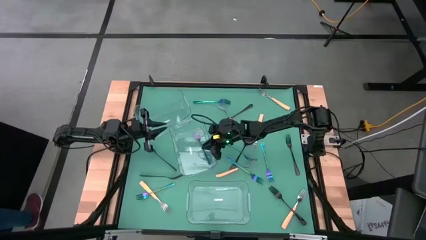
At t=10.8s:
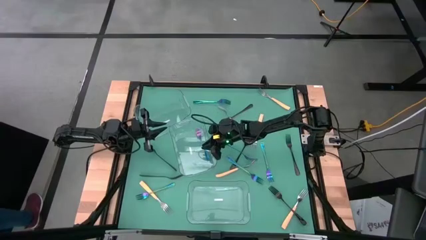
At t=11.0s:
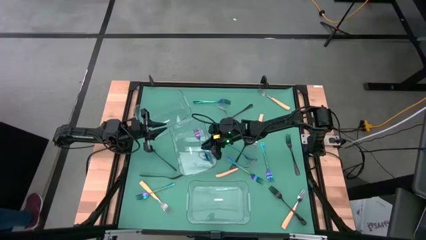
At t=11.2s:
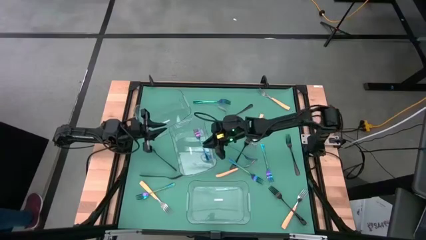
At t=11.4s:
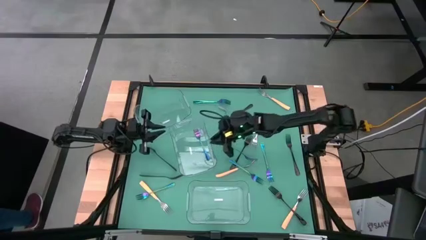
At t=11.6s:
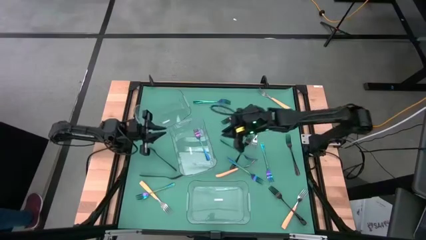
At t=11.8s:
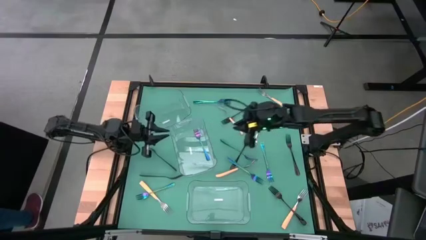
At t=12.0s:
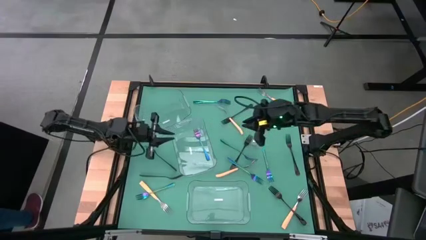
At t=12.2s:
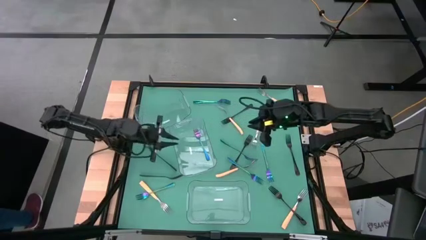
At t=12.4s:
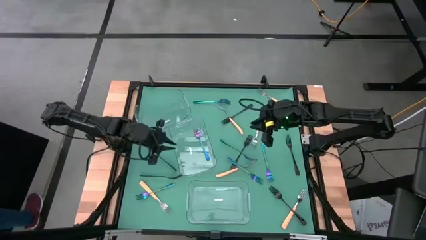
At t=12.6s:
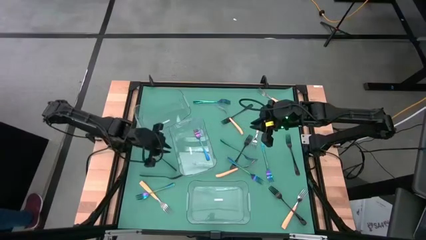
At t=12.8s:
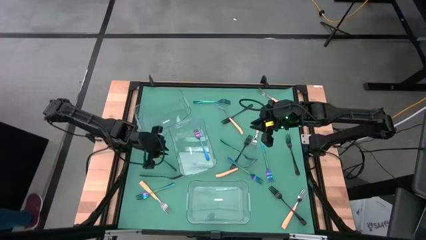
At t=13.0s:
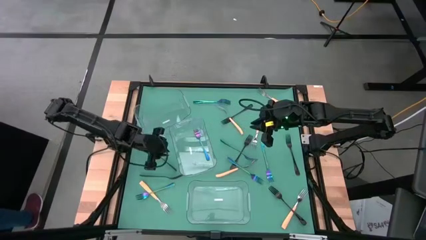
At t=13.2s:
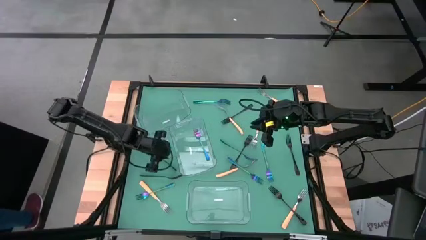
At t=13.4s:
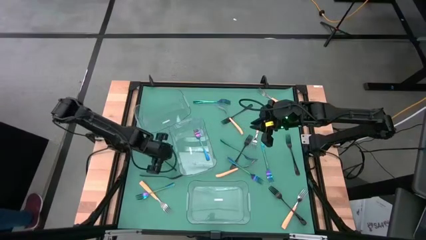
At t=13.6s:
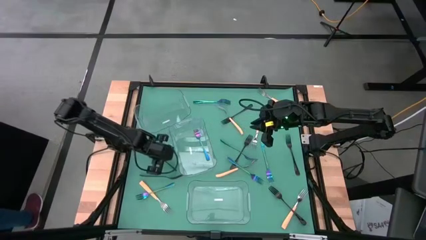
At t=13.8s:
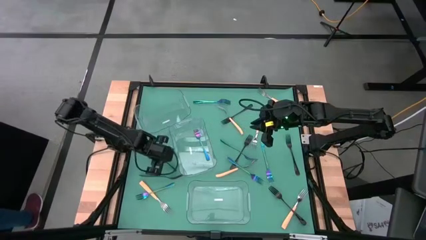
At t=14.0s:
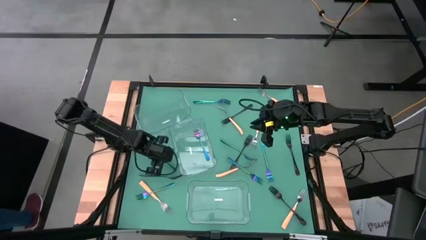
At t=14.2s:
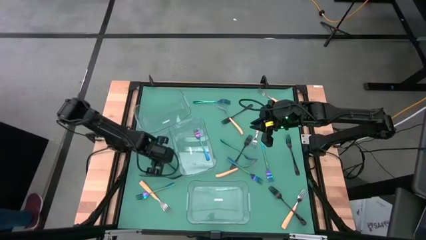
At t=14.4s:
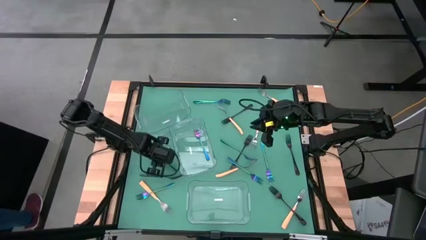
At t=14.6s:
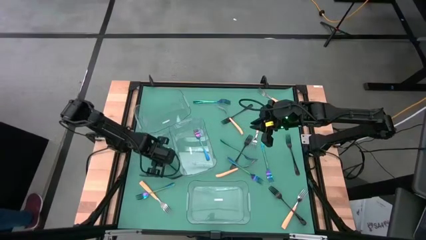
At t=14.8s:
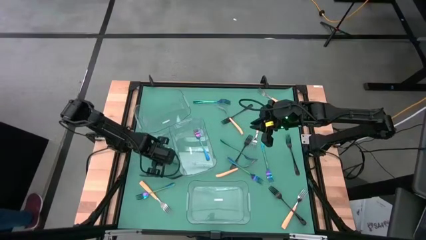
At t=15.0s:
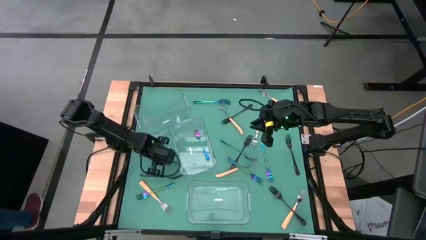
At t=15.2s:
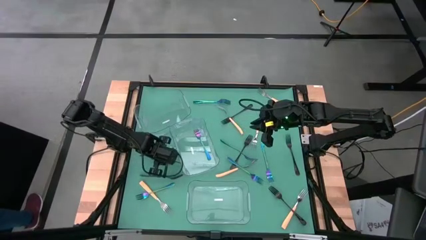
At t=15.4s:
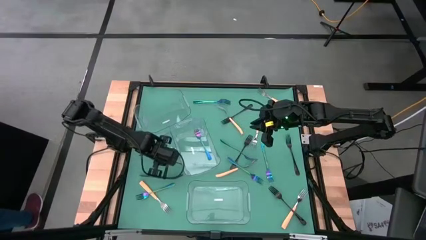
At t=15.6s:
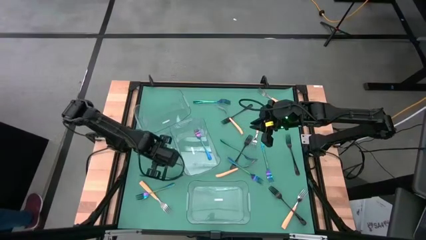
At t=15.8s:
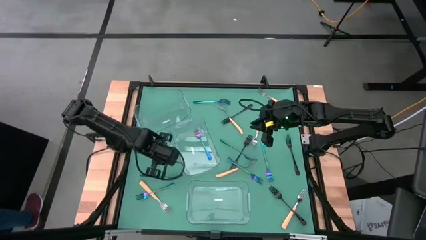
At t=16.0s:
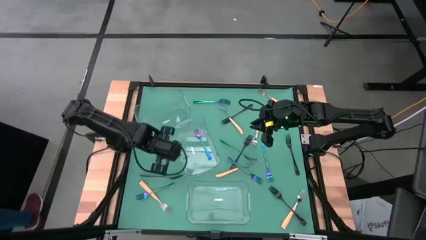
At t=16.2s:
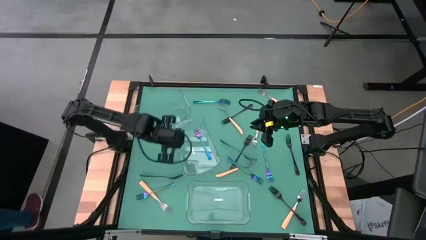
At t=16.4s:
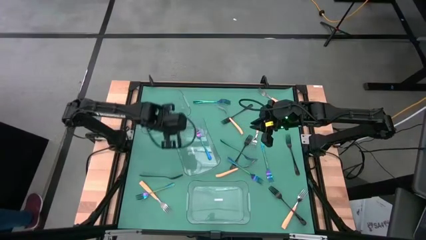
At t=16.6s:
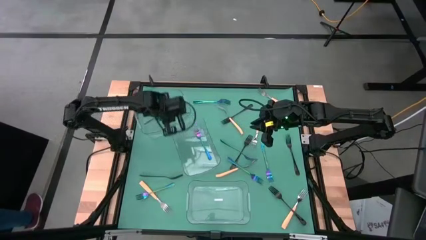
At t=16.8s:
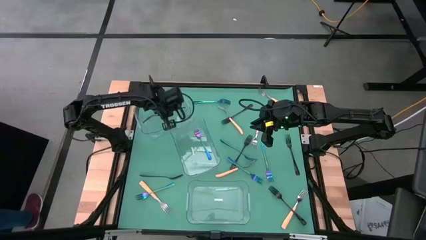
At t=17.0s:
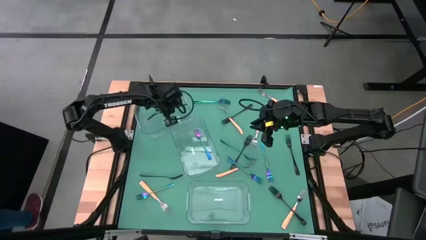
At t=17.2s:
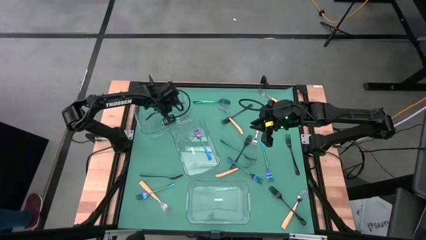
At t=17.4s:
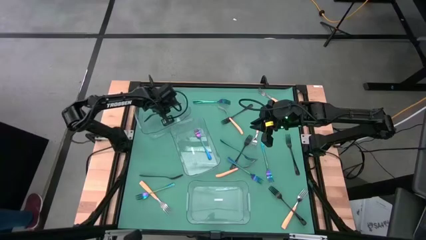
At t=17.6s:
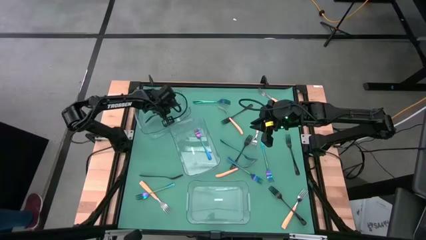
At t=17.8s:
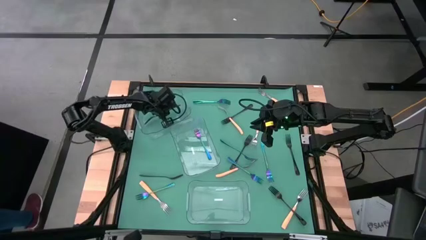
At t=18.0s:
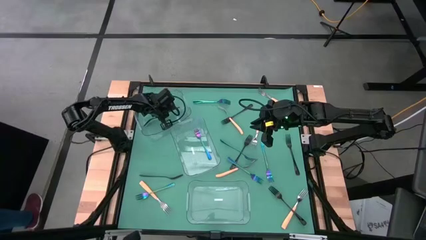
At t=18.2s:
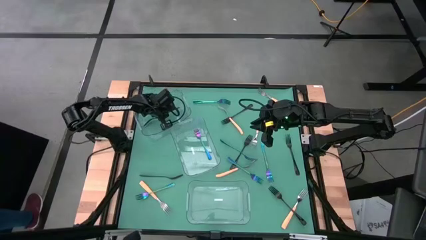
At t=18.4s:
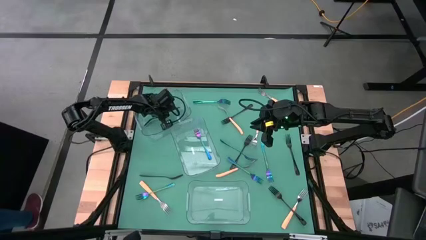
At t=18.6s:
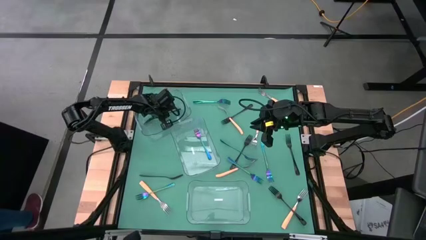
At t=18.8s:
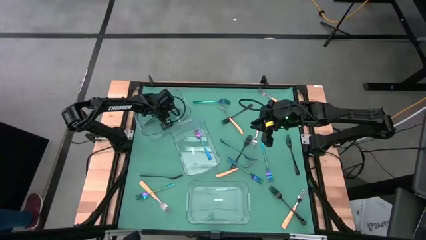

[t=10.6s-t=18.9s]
Task: Sort silverware by color (type)
Put the black fork into the top transparent bin

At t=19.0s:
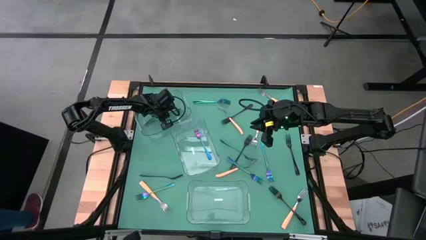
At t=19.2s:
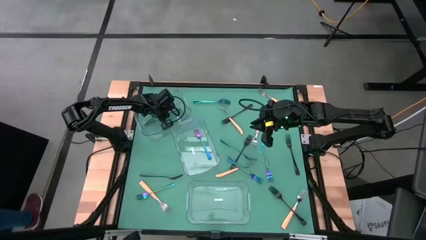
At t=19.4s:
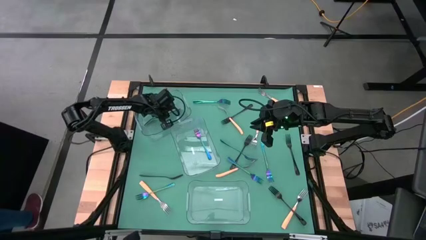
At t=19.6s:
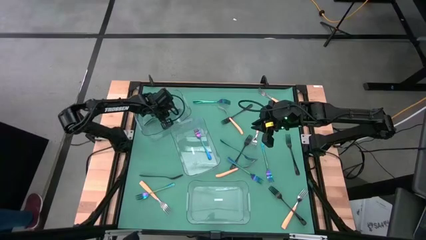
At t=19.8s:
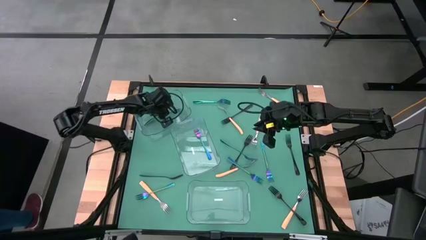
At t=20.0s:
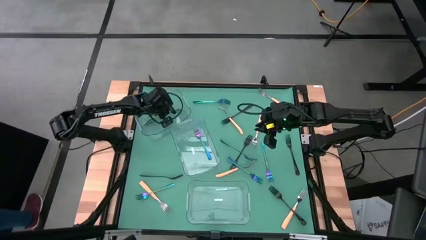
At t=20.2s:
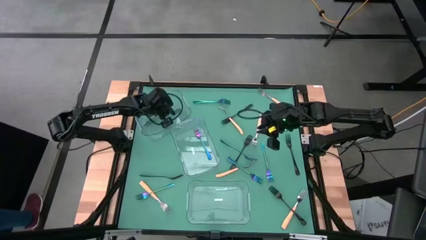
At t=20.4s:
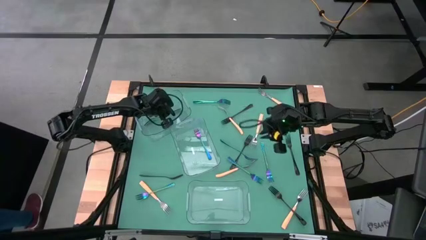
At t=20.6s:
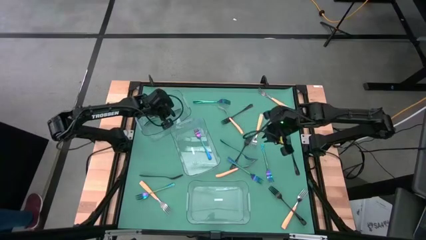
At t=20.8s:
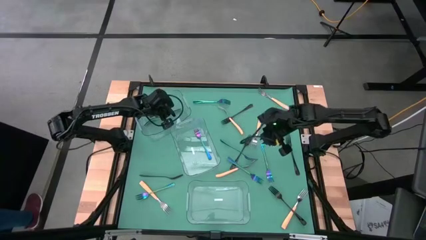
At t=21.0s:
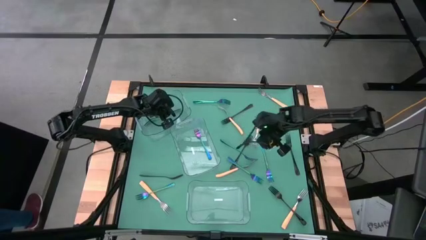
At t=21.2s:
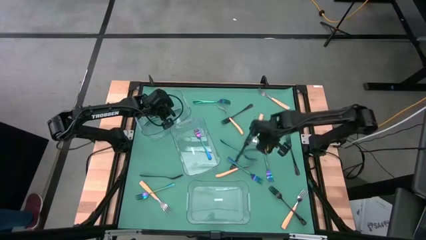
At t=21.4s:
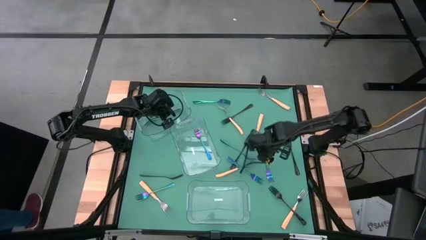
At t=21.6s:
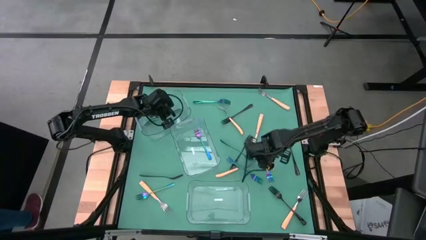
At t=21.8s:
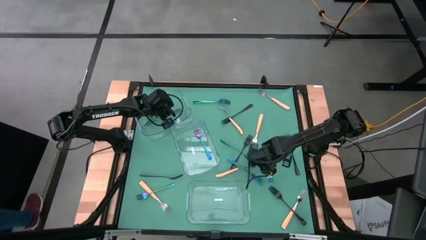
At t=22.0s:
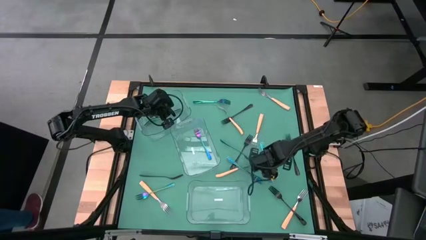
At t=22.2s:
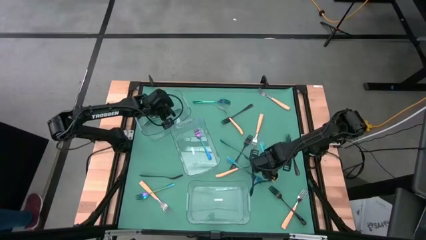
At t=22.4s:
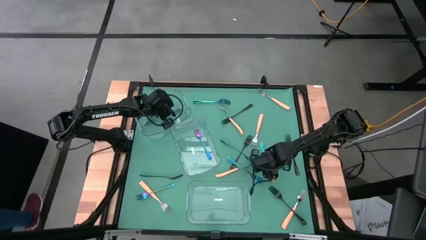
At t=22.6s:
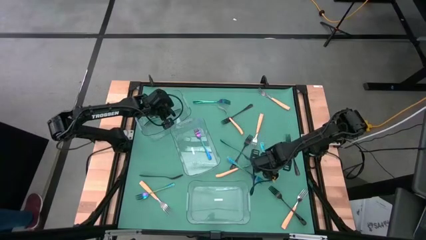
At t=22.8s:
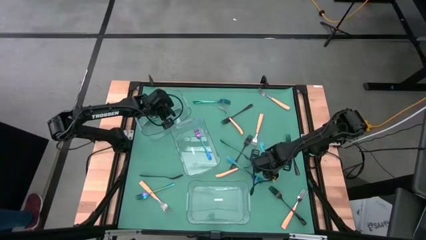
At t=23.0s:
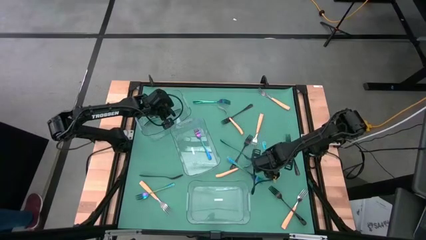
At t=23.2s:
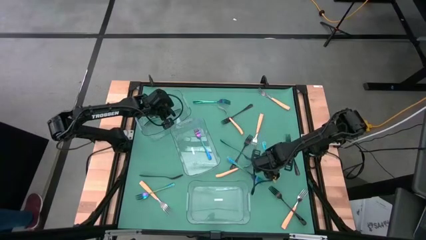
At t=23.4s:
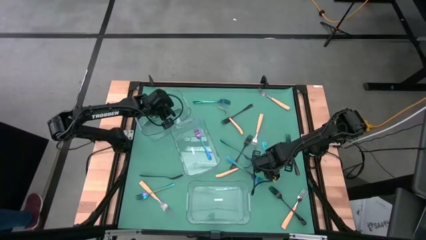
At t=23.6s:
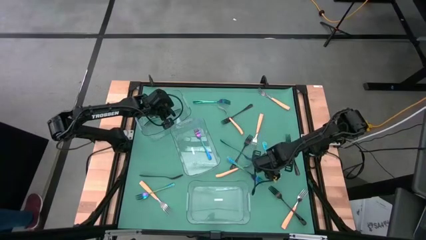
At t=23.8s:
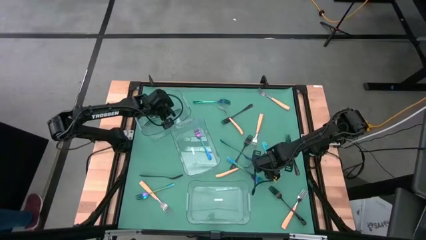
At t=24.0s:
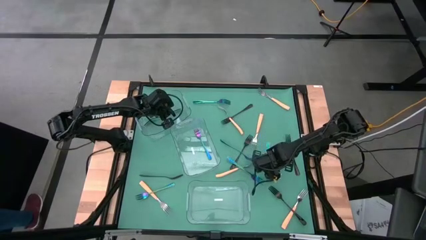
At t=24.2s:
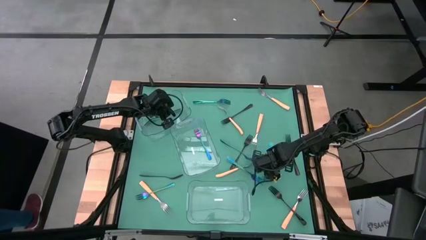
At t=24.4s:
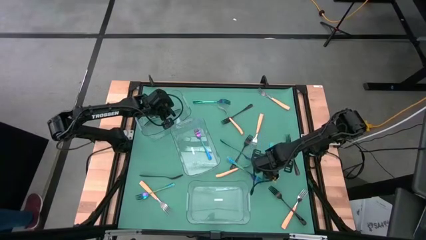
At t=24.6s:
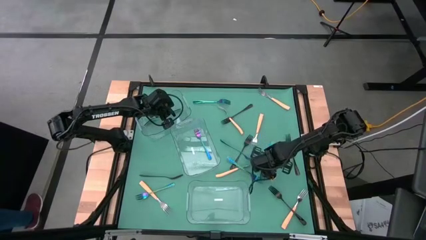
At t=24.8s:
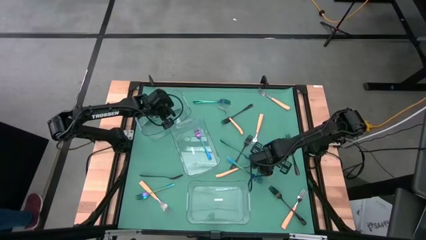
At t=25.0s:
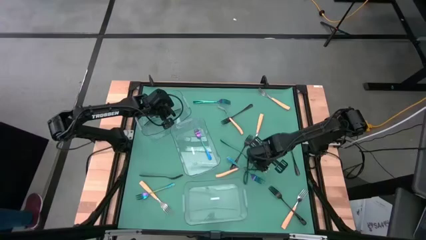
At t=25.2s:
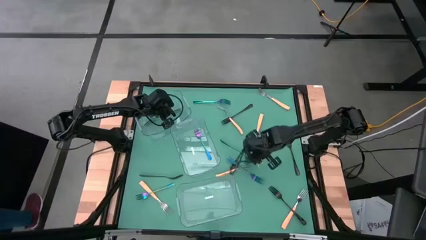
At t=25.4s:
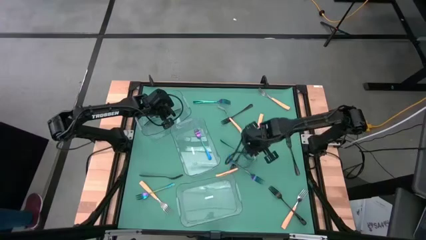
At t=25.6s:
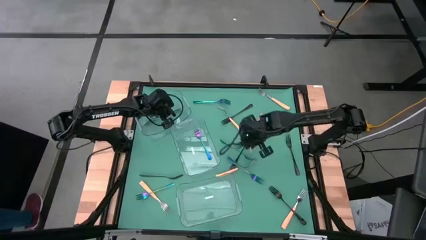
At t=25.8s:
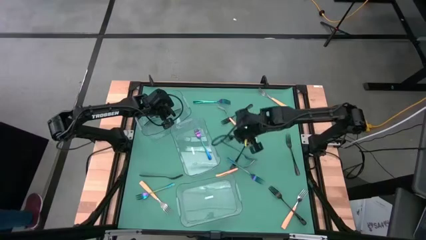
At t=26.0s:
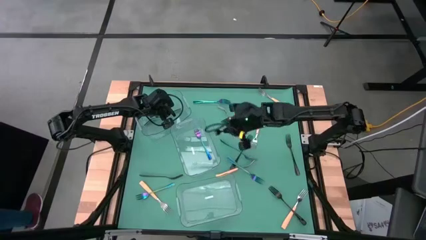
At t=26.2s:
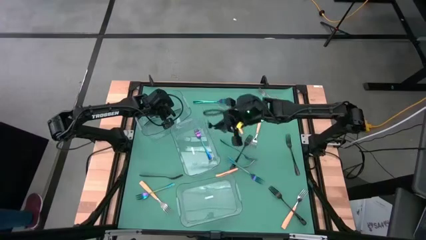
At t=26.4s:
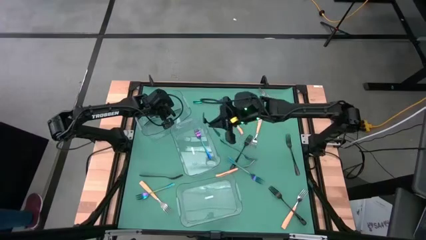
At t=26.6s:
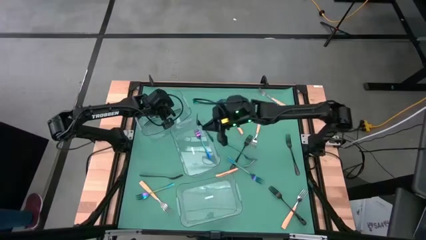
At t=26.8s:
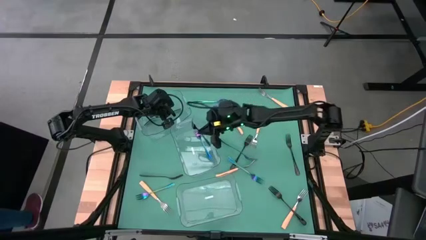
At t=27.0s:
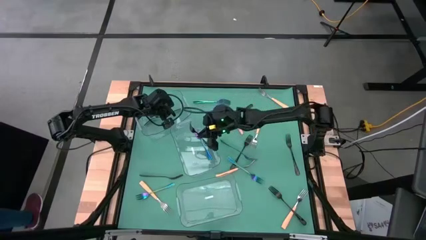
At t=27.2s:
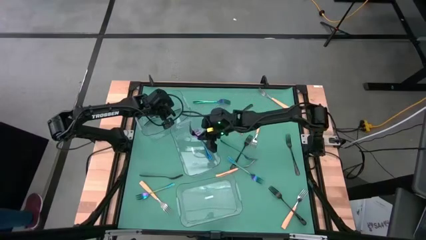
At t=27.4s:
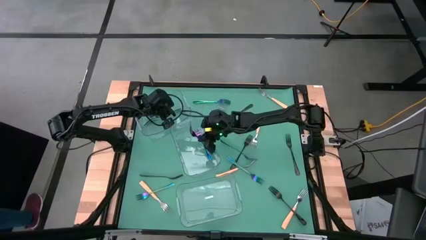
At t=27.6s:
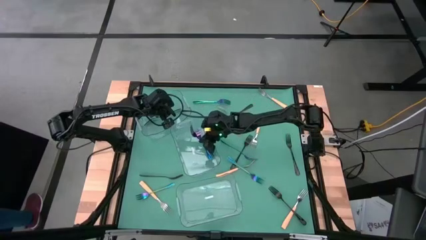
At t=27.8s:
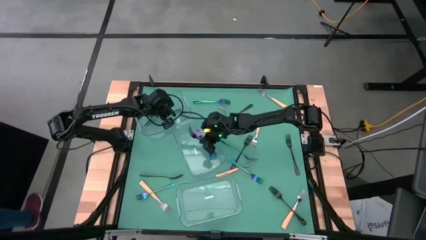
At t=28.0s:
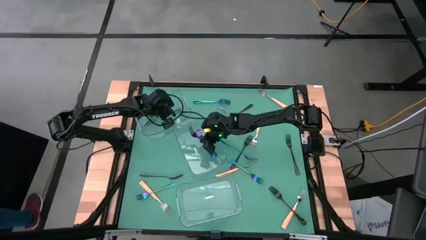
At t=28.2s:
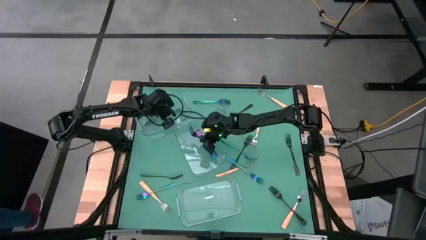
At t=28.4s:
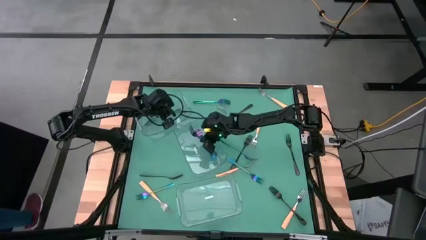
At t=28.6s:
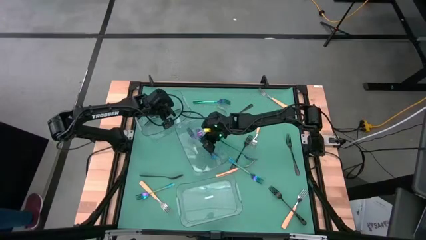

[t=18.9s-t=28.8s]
Put the blue fork into the center transparent bin
